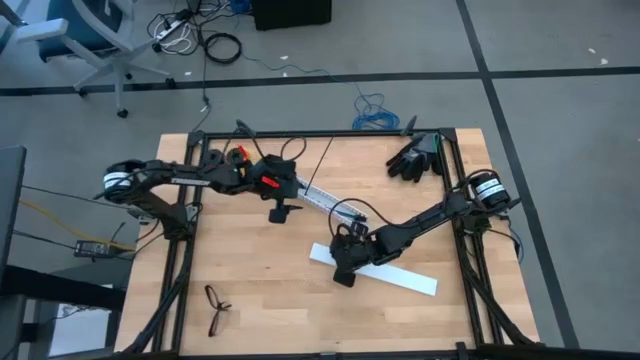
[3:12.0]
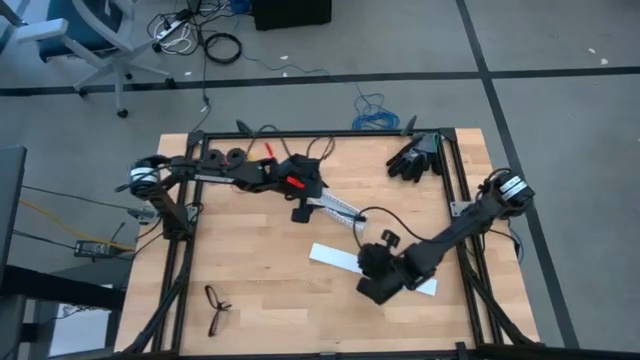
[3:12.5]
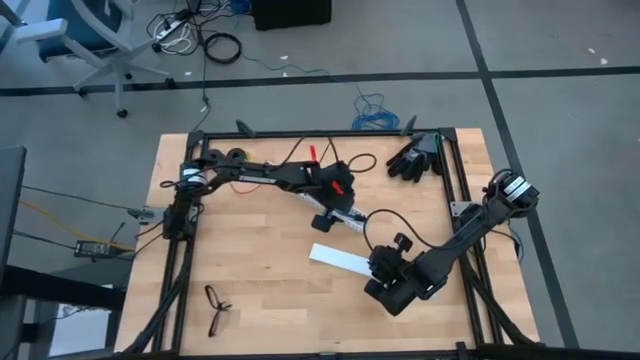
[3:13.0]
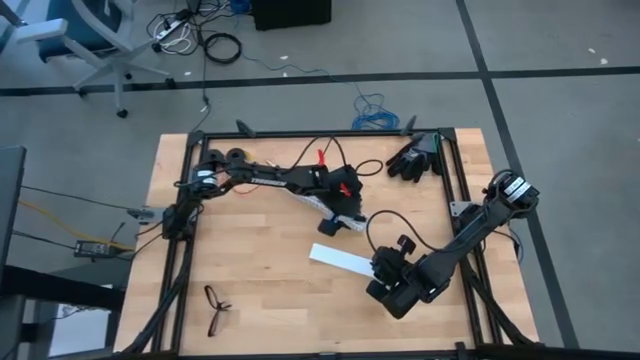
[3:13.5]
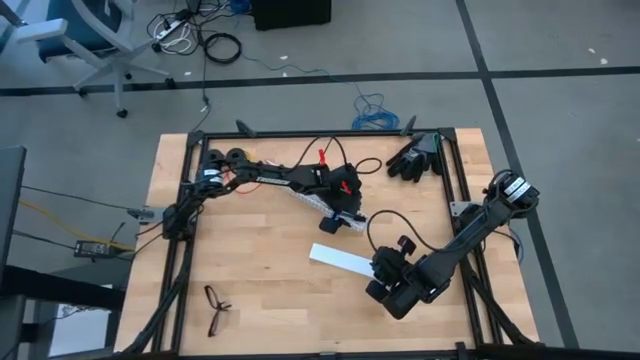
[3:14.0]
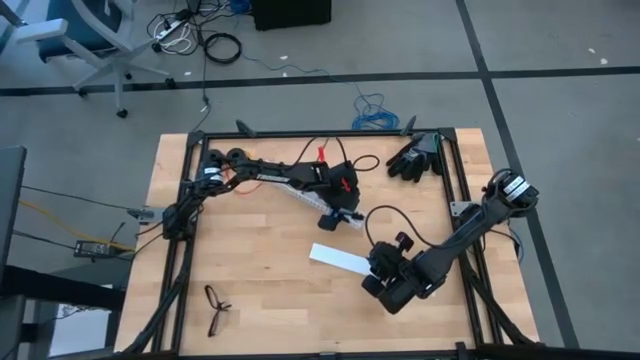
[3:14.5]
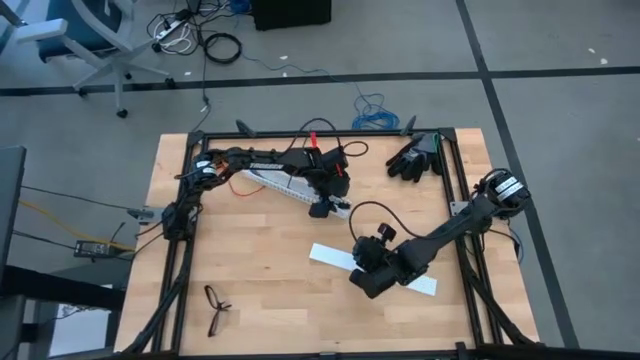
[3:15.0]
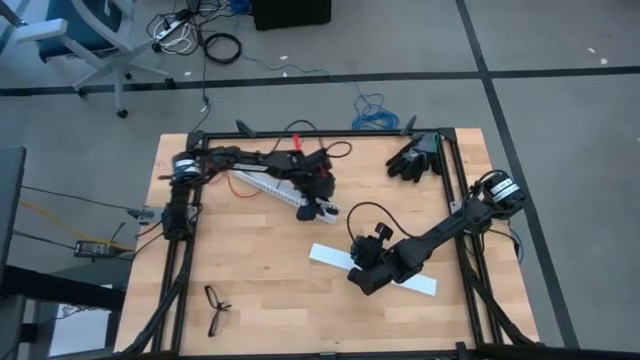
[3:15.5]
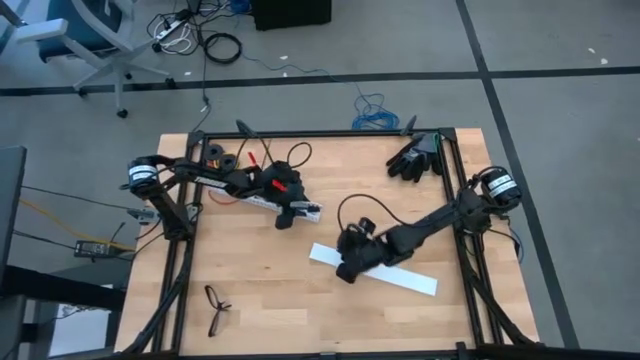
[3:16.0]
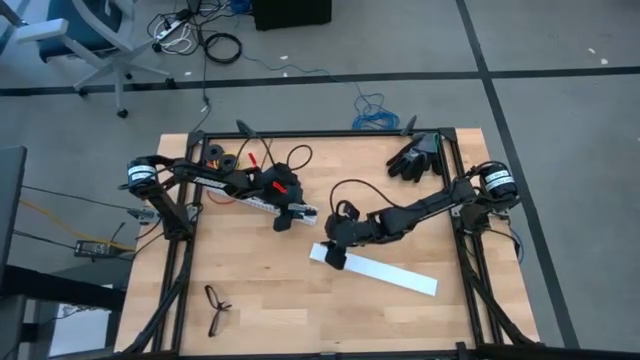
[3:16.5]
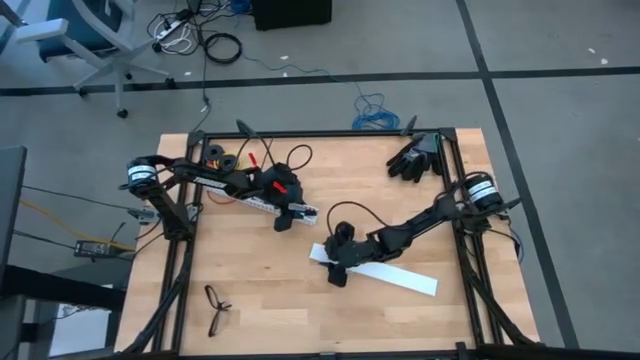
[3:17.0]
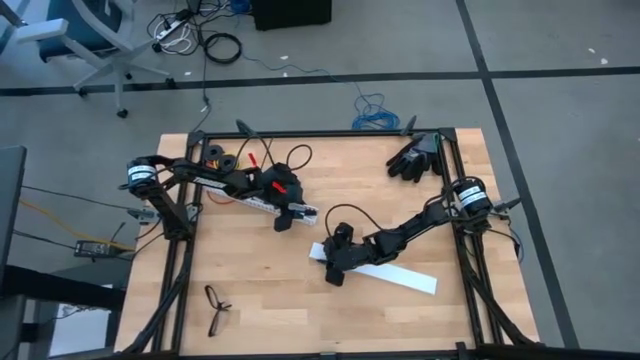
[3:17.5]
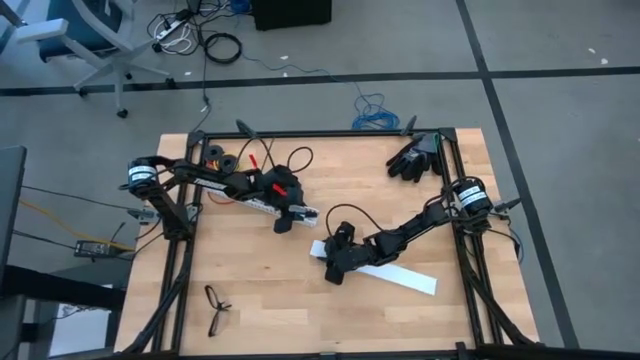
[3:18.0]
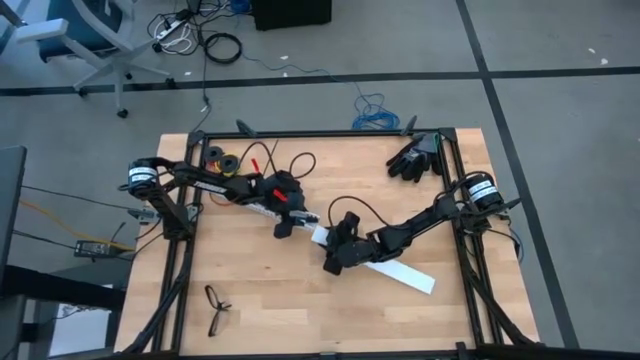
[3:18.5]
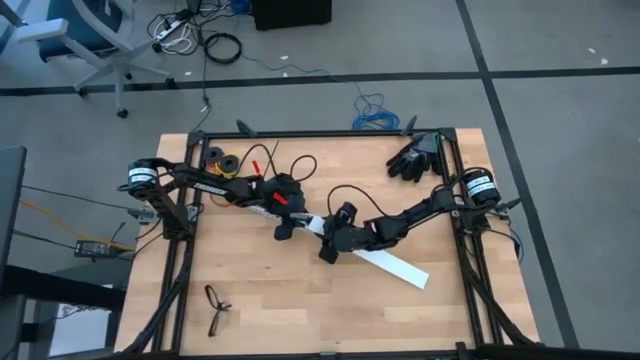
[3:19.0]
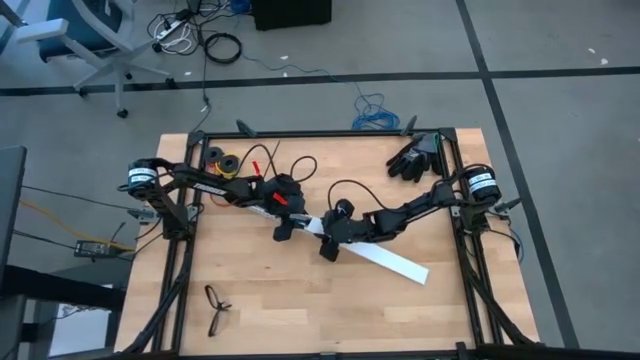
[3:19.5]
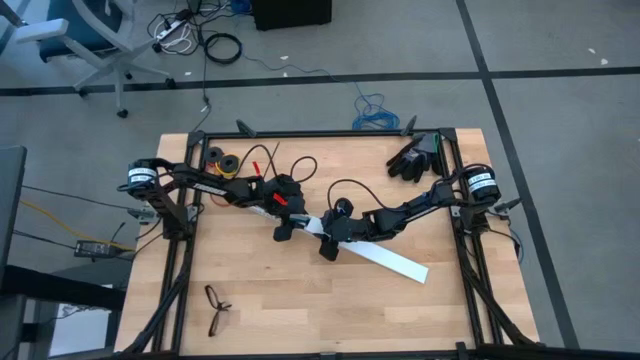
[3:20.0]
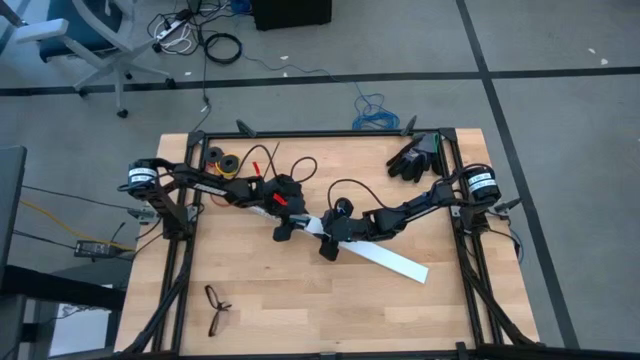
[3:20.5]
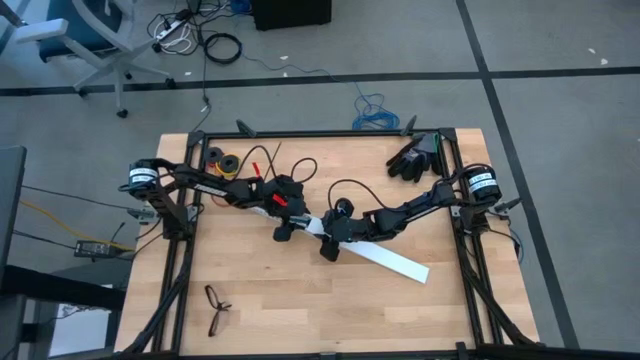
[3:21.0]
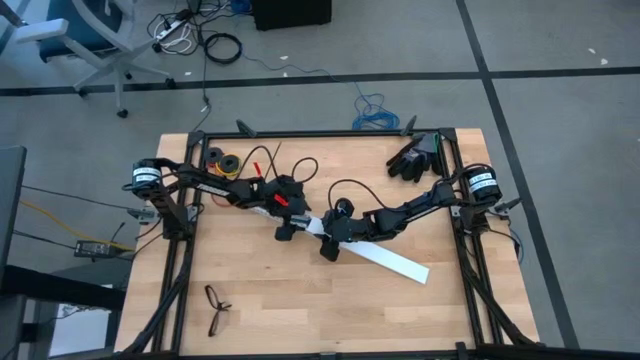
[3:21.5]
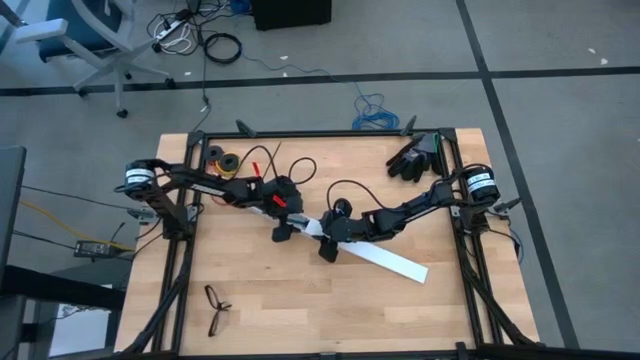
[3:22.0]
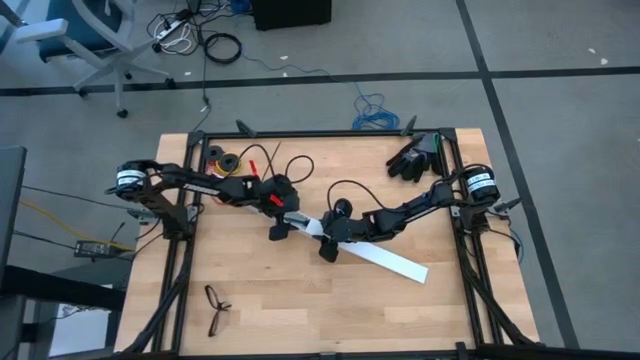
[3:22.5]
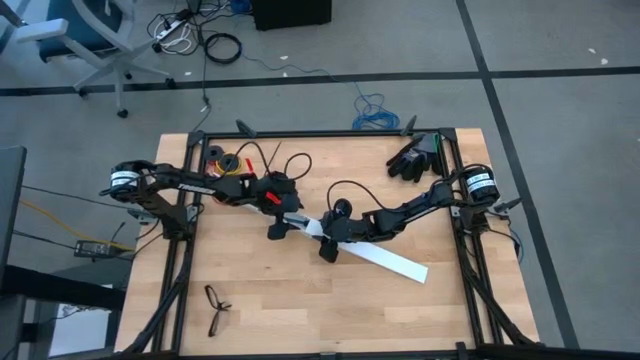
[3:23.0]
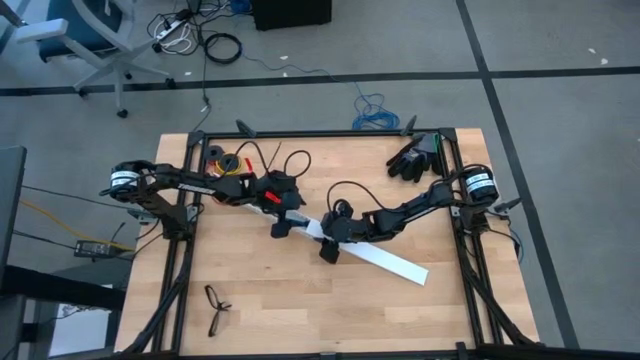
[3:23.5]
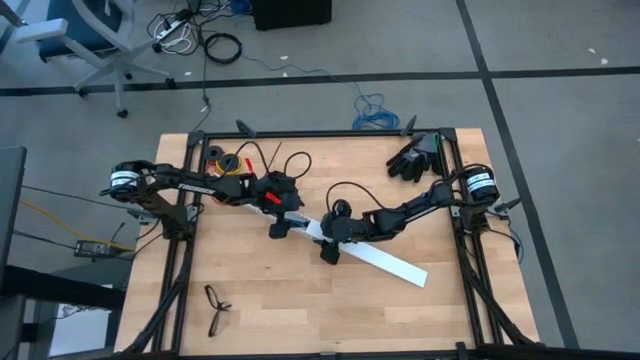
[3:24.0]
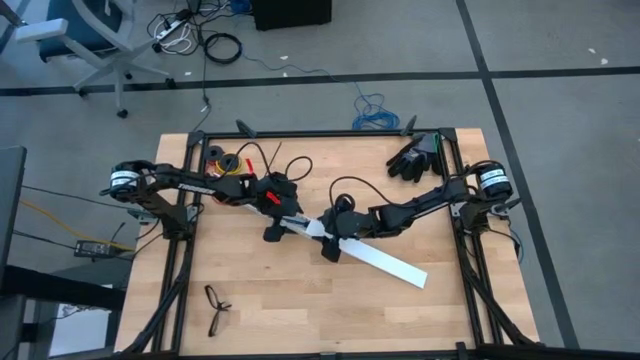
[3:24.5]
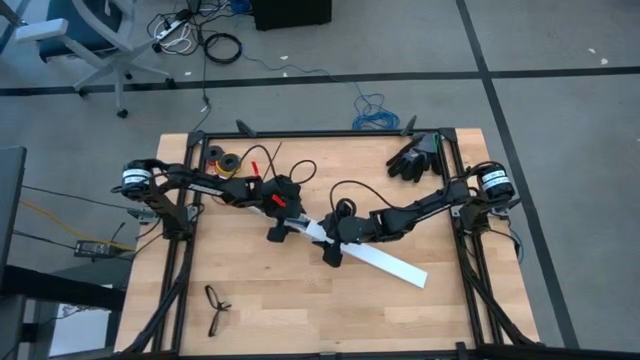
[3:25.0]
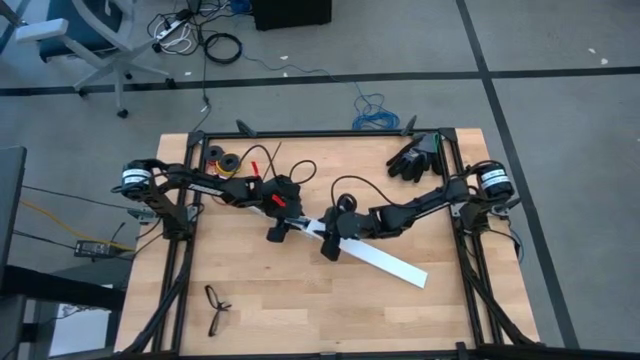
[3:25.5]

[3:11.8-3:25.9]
Task: Ziptie cables
Close the white cable duct

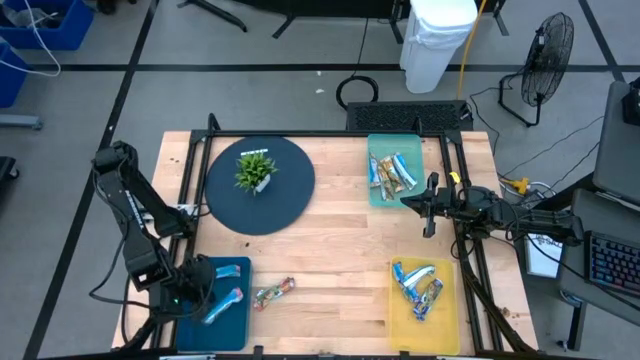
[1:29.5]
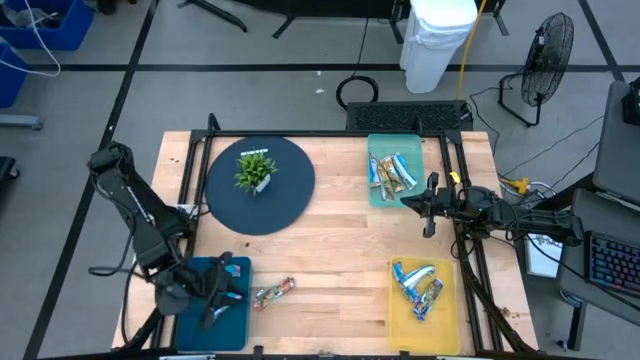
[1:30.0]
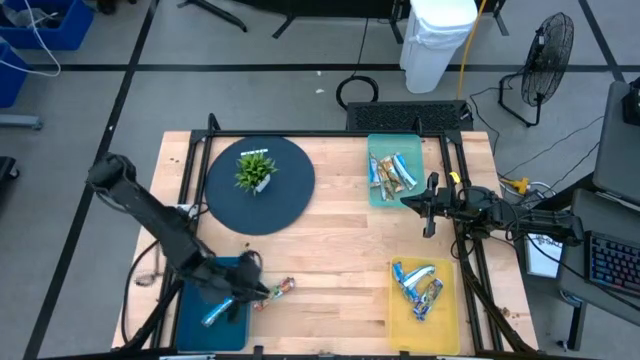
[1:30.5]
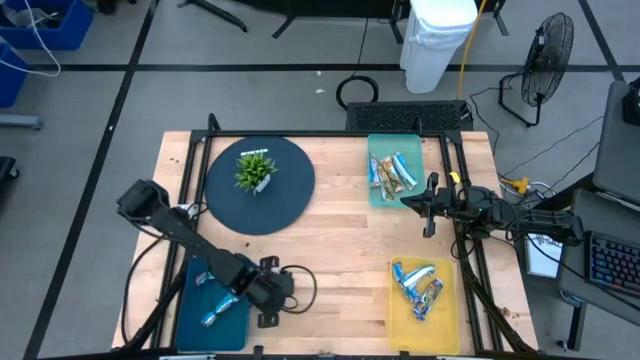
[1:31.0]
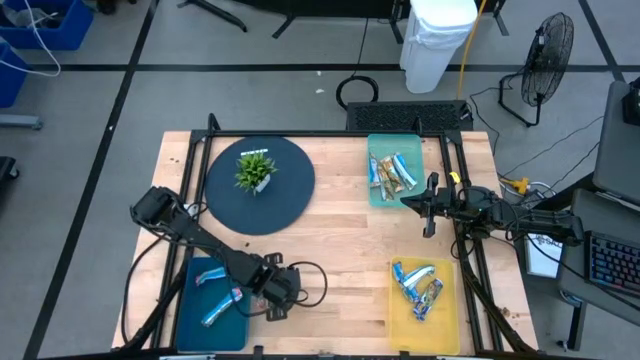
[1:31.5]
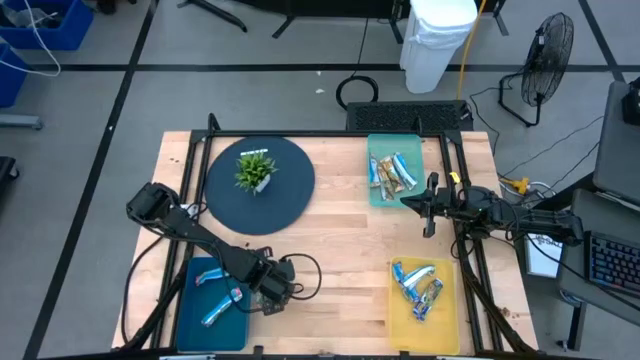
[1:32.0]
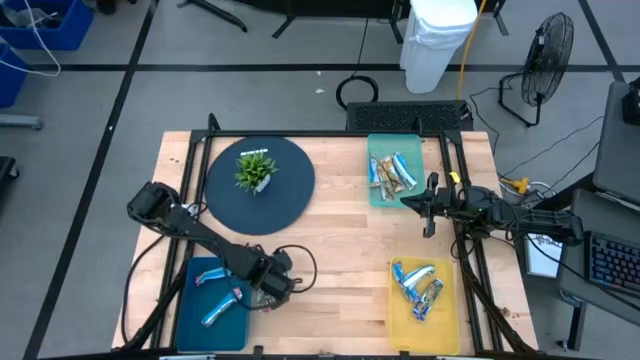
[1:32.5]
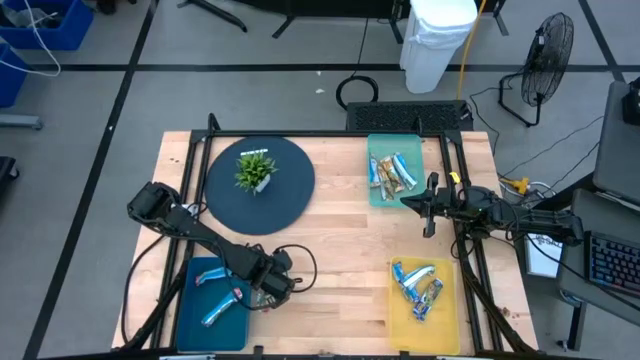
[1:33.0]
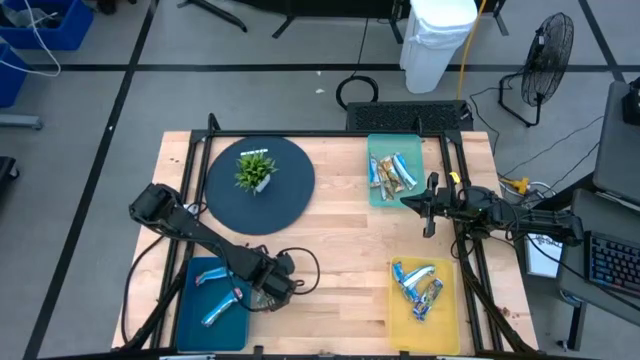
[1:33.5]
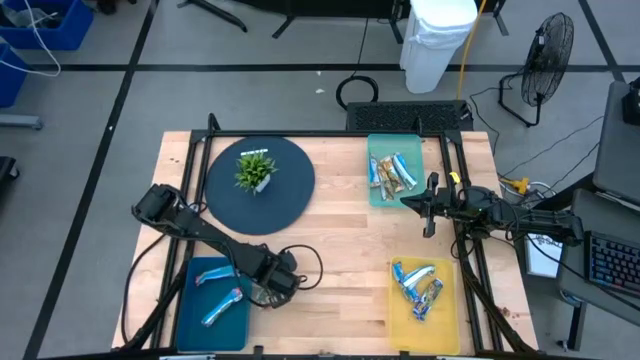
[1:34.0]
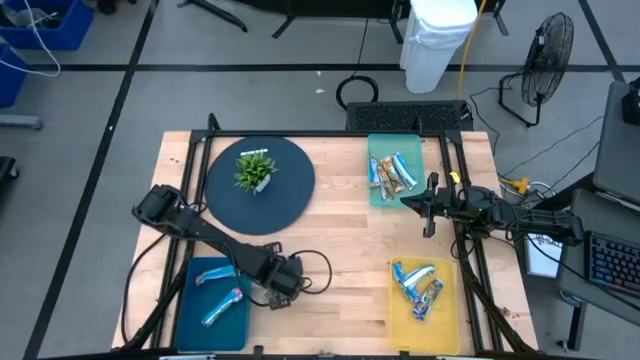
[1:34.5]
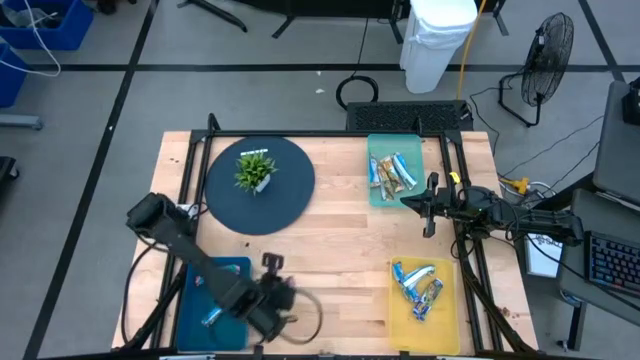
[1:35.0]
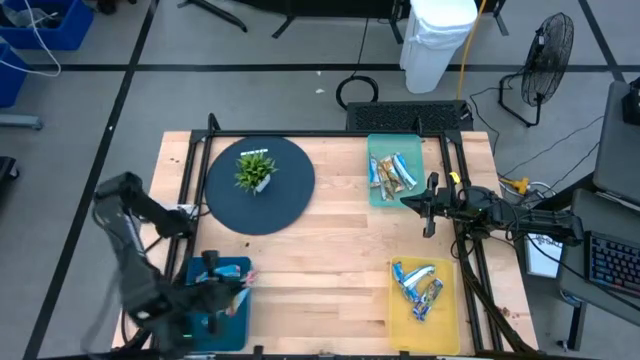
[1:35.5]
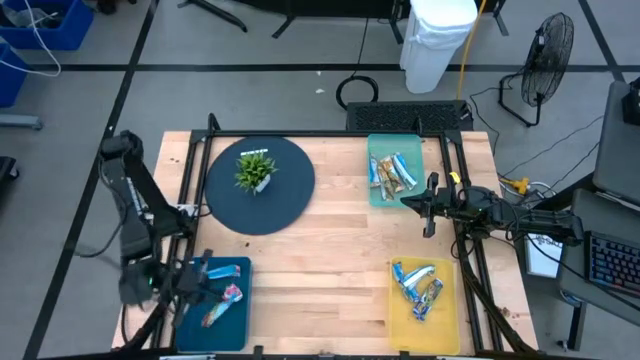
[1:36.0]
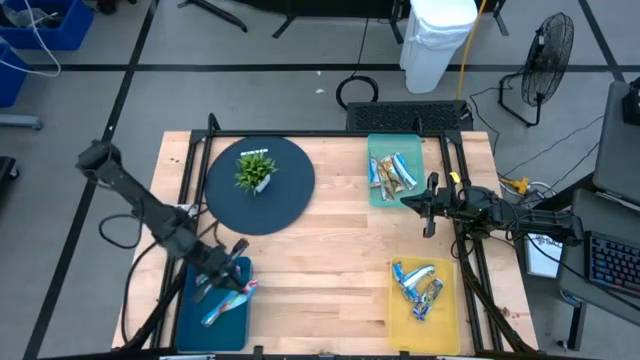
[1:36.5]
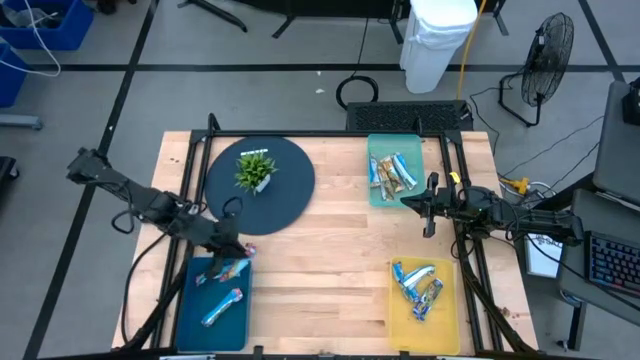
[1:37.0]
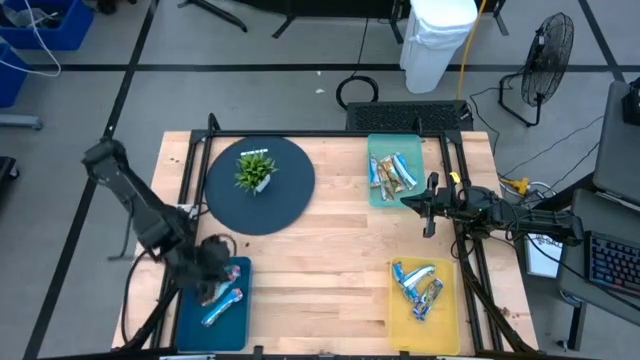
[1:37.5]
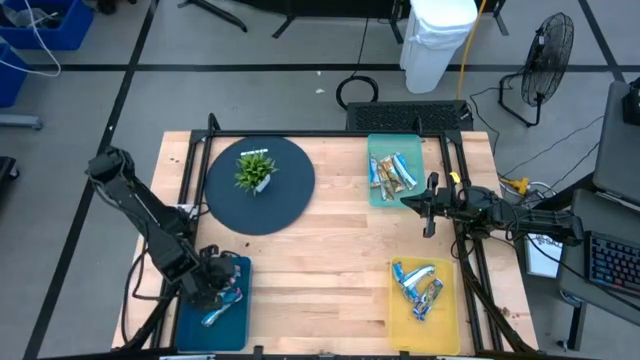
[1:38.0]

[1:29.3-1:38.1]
Task: Pick and place Granola Bars by type
Put the red granola bar into the blue bin
